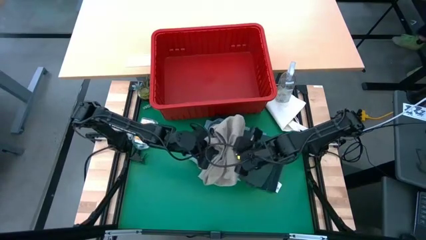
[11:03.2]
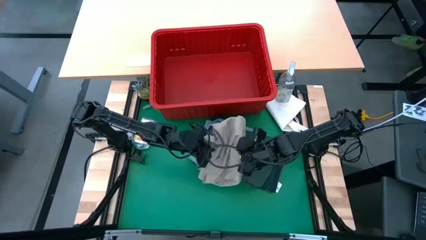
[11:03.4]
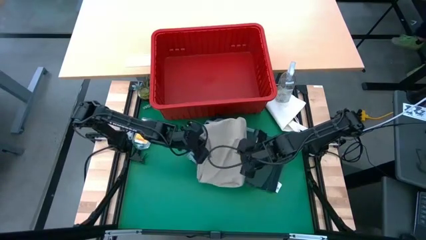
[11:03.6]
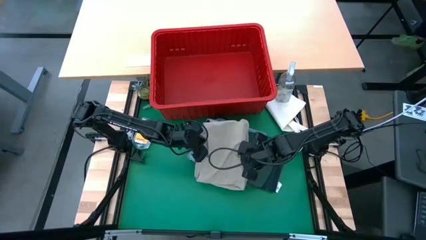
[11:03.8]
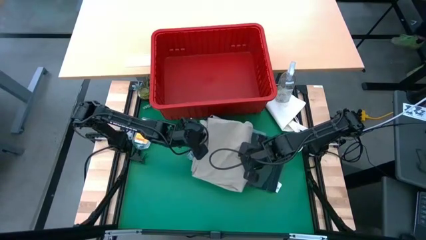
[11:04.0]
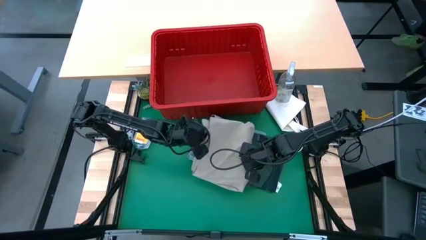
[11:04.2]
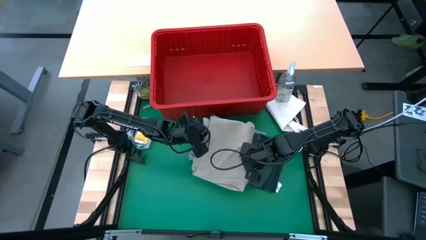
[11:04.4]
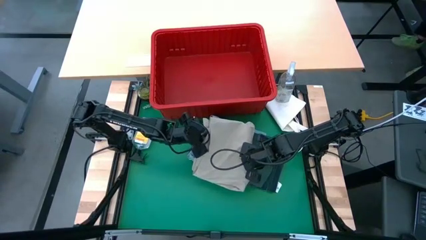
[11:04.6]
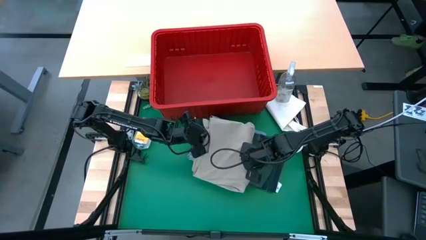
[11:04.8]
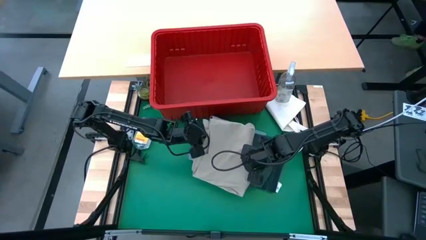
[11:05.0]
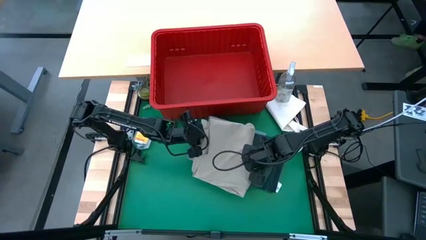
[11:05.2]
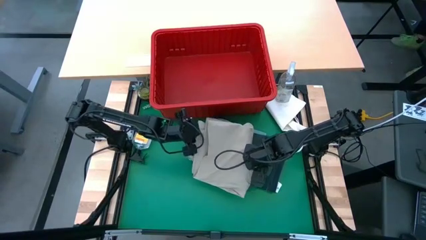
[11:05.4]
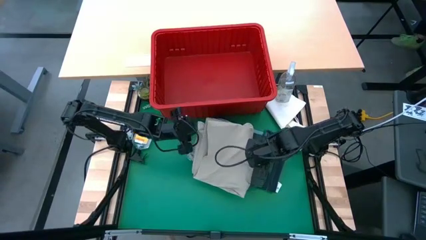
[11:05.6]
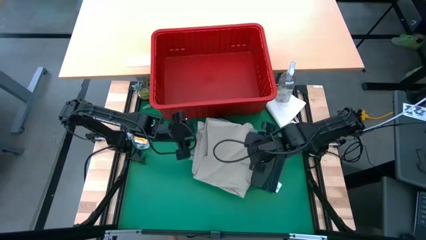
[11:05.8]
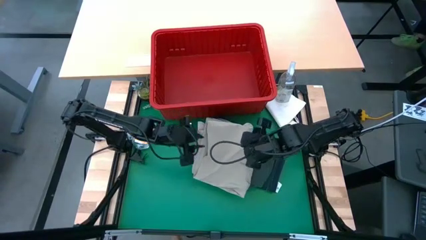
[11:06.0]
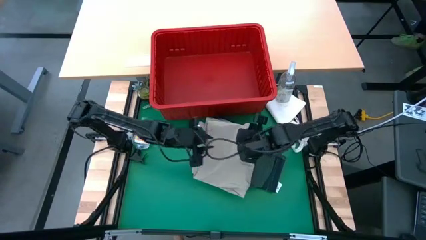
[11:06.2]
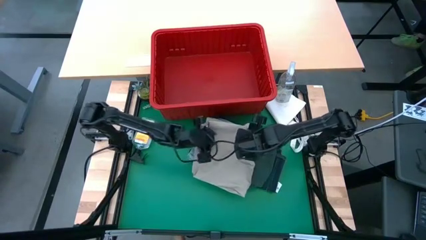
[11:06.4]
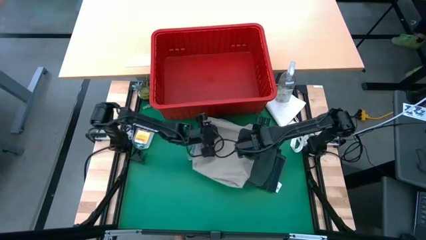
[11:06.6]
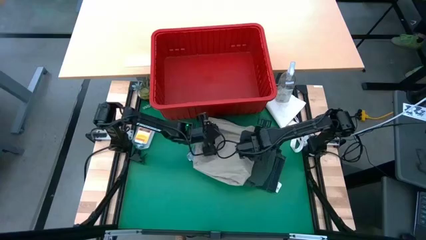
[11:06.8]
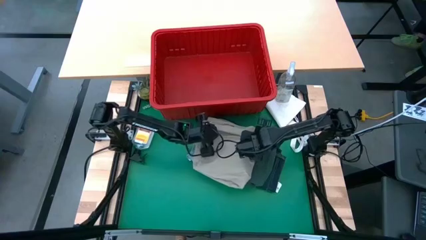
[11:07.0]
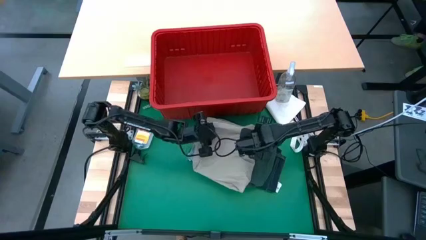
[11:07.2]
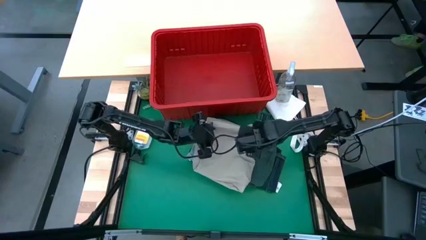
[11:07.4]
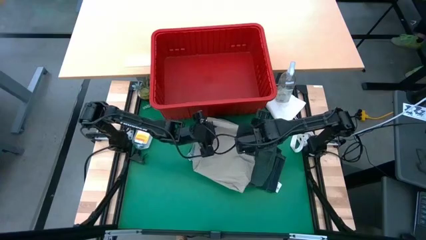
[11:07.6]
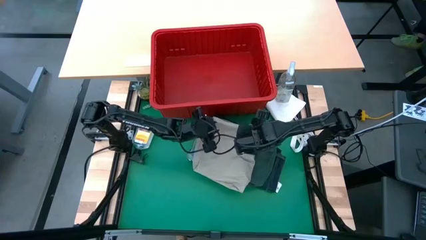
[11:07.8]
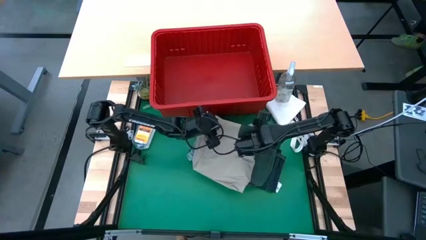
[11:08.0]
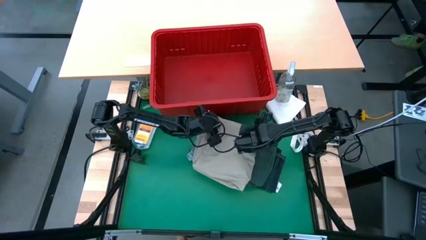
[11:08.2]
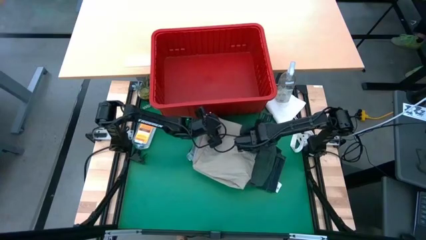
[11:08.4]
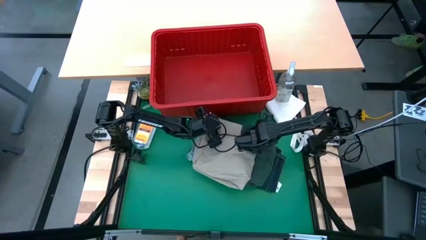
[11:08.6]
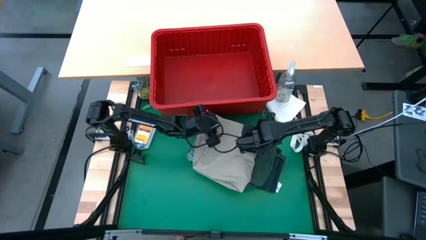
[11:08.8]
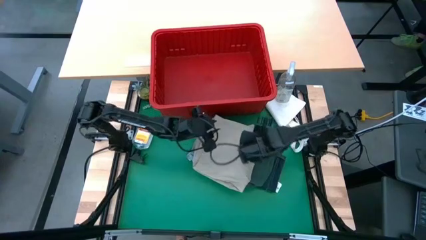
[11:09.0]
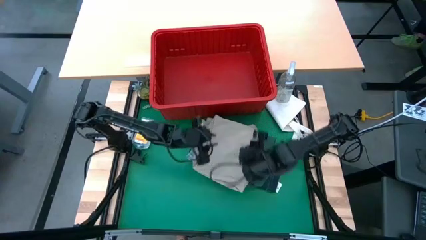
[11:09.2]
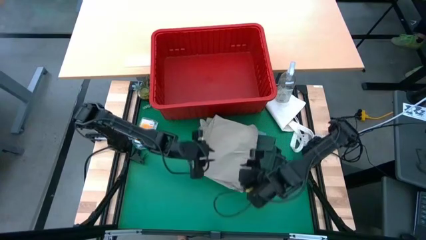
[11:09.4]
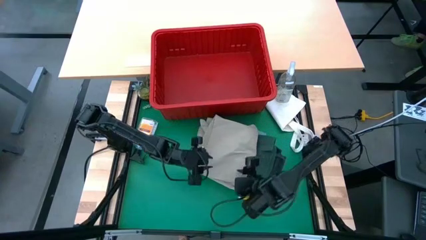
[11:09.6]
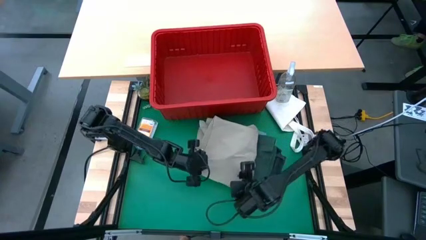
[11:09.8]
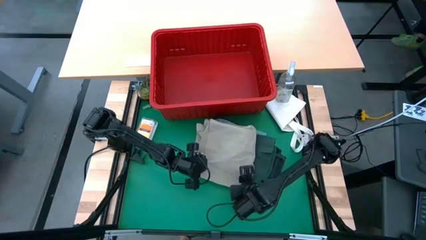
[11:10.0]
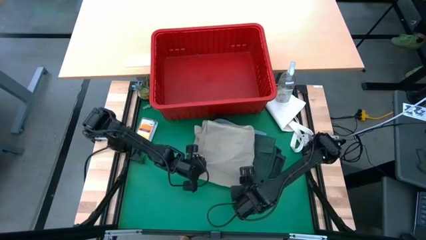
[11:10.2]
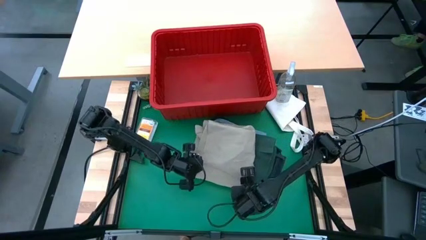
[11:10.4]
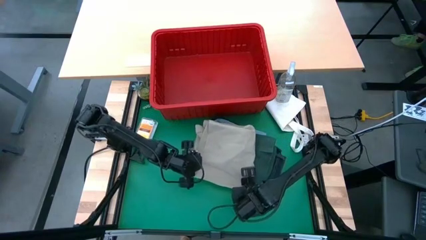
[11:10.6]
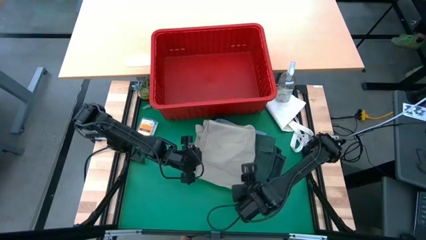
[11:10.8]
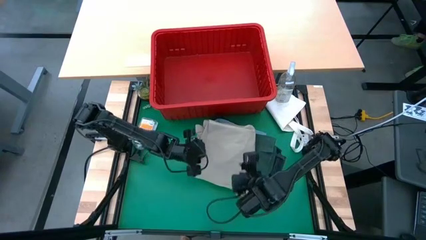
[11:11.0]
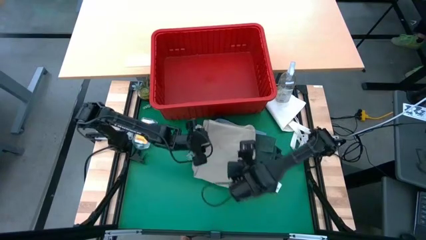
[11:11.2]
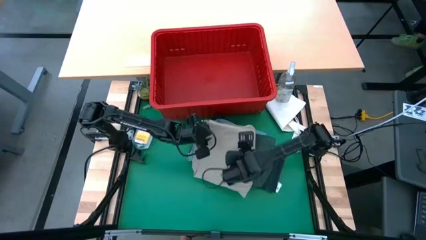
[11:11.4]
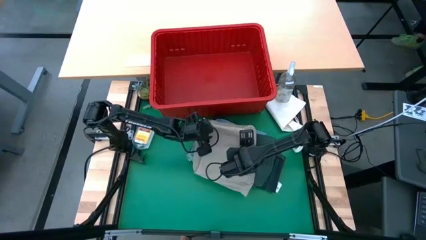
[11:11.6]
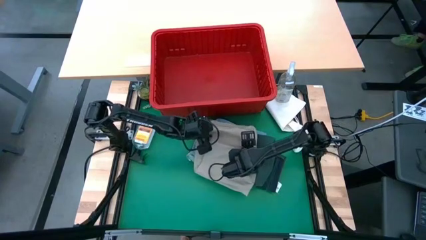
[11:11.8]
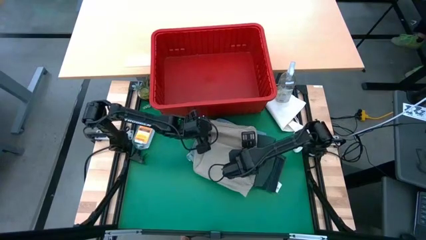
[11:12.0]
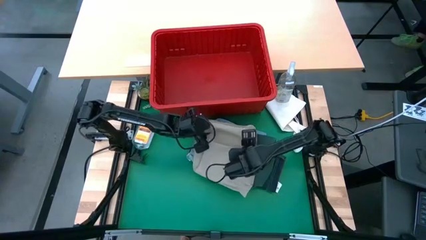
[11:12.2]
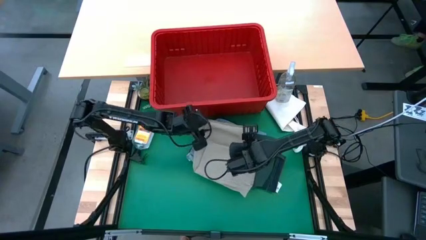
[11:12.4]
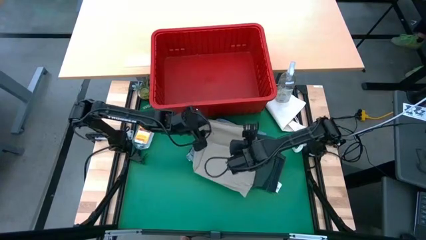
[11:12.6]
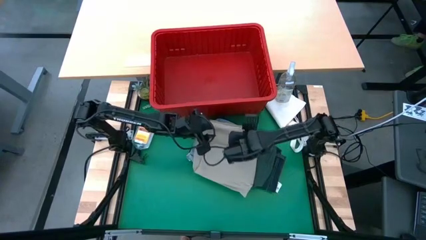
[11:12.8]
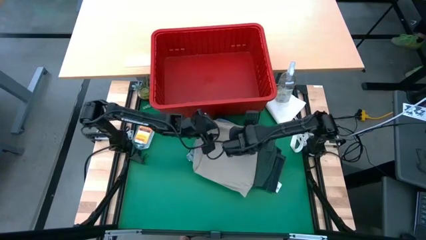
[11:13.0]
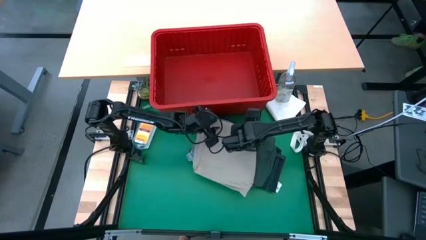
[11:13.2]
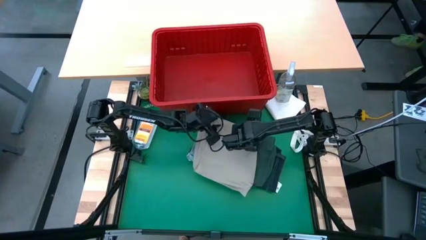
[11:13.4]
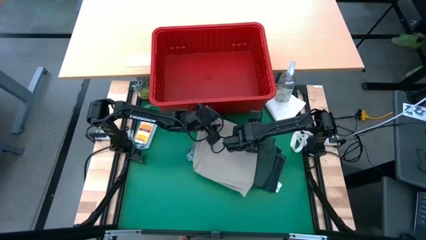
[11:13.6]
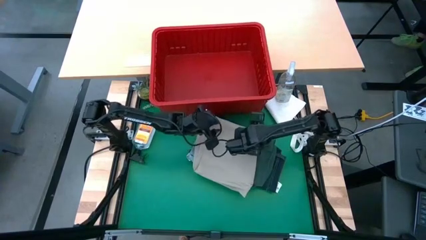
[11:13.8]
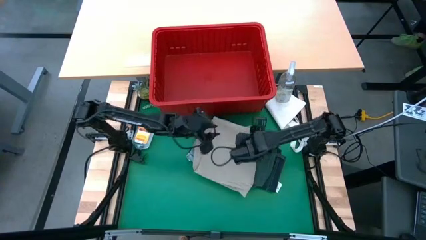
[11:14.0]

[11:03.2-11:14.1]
Task: Fold laundry
Stack the beige shorts on top of the green shirt

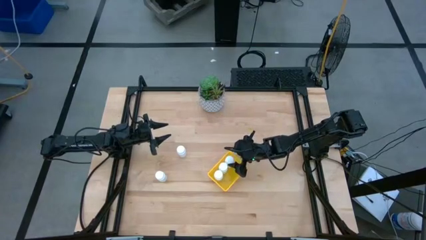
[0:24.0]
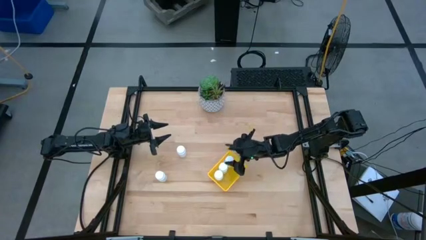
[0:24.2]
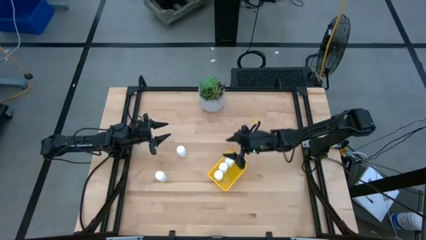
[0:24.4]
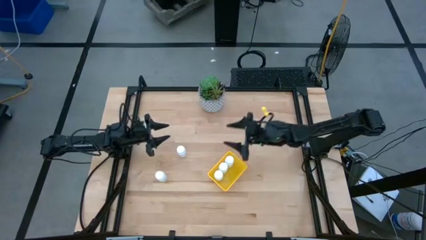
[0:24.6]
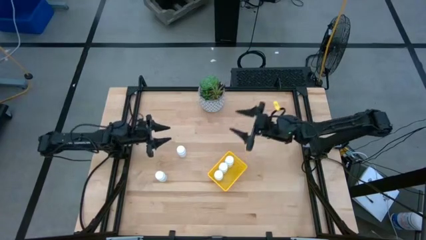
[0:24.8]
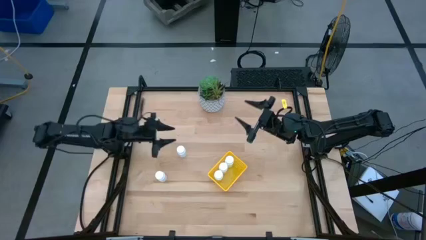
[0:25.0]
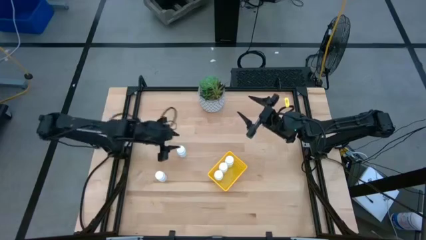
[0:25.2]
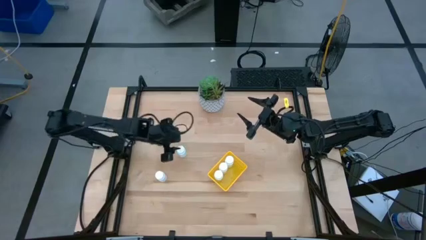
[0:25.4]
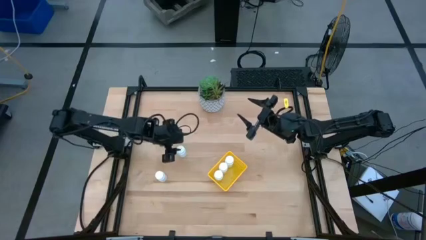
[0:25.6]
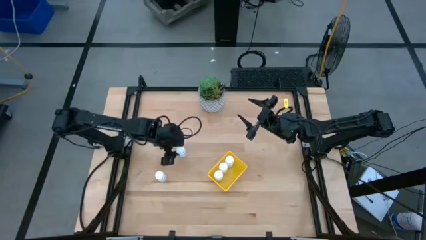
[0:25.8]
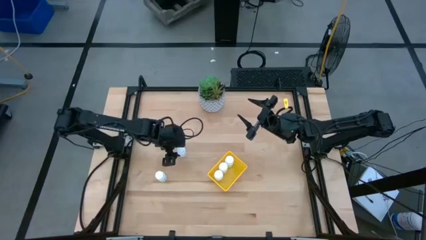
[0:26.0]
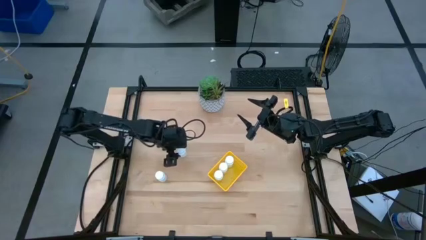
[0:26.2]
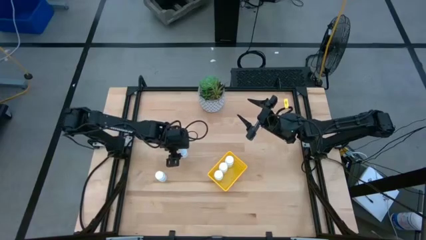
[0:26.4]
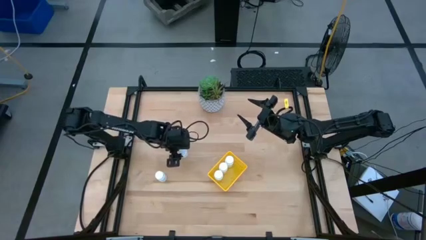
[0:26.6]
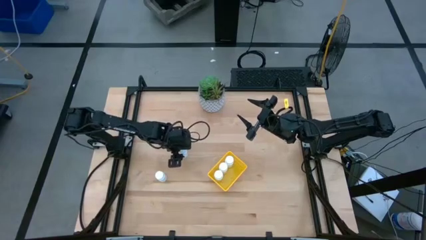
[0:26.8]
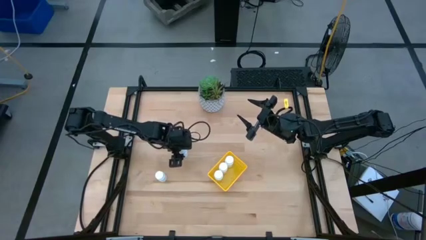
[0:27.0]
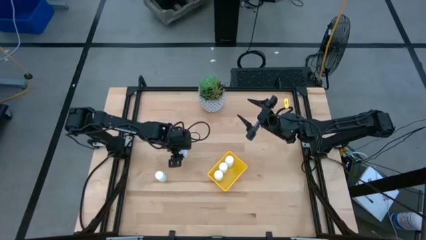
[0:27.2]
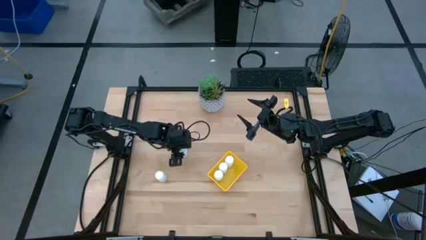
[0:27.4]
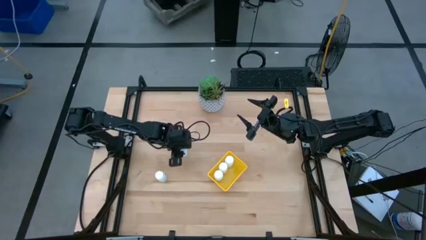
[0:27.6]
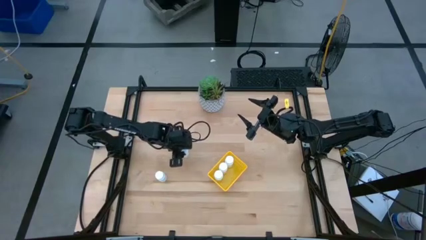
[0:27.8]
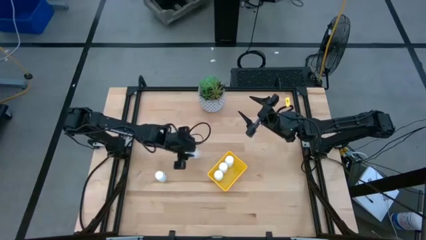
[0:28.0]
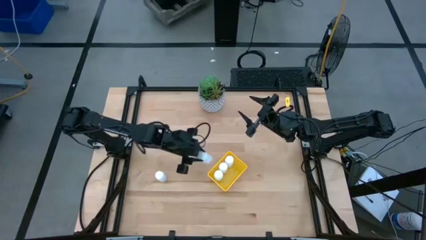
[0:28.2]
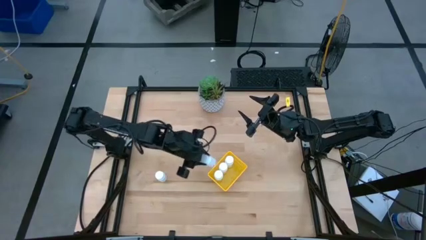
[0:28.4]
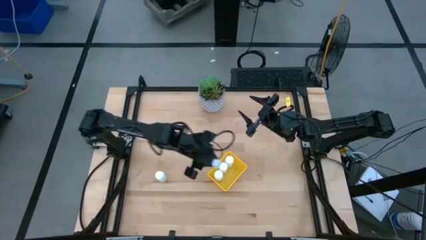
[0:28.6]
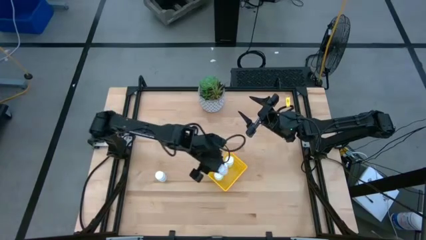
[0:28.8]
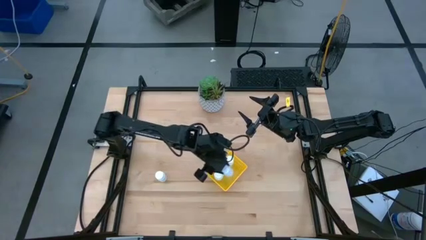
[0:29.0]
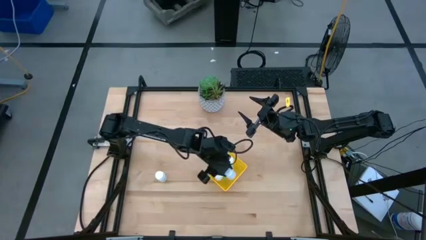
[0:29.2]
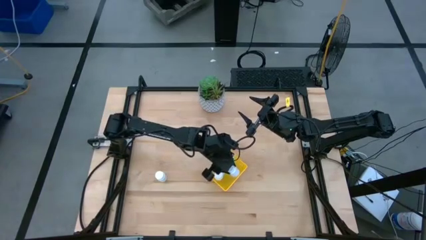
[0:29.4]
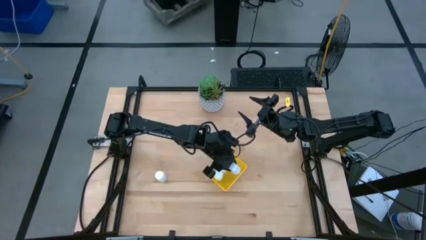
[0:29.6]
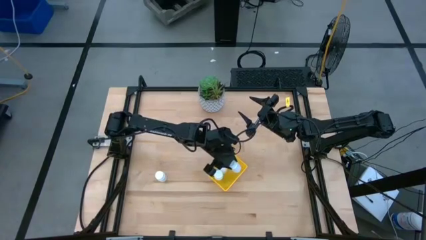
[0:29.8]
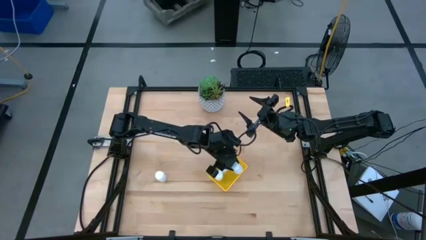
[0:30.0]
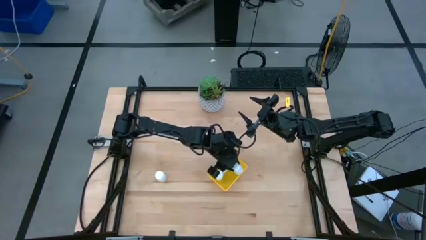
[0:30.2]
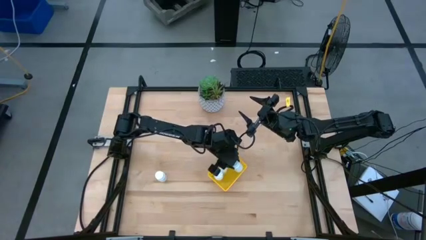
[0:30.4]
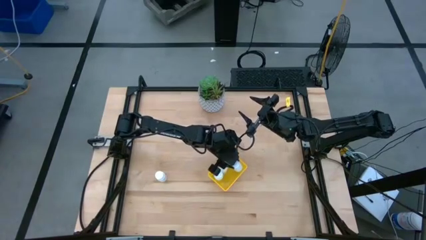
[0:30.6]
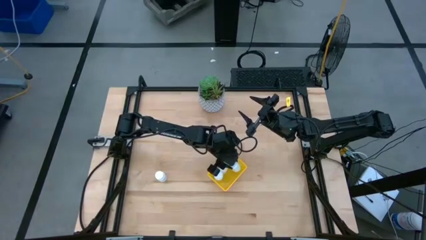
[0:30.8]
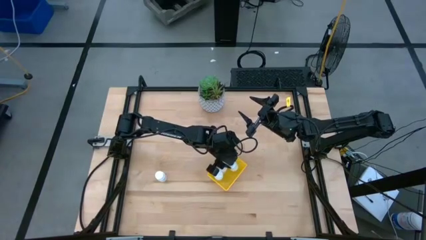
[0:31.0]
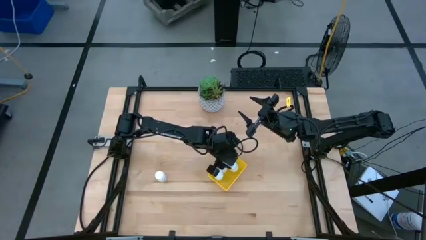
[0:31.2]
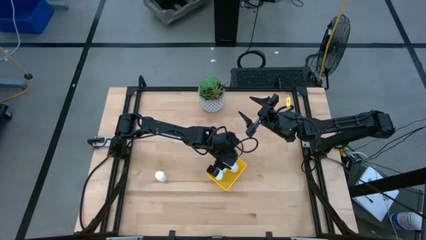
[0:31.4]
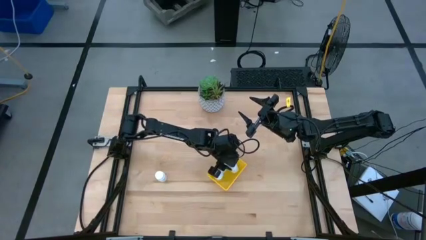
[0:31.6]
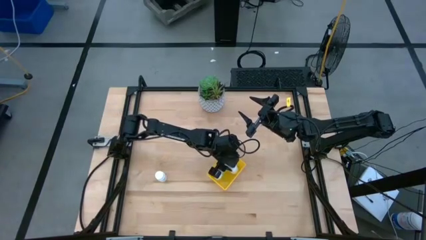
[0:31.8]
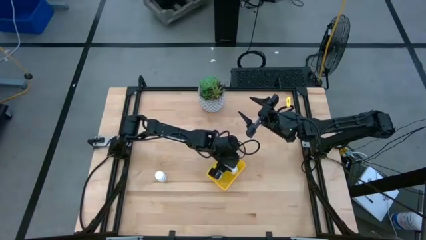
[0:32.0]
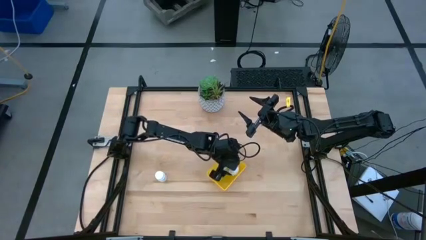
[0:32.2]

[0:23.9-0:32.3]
Task: Pick and place pill bottles into a basket
Put the white pill bottle into the yellow basket
